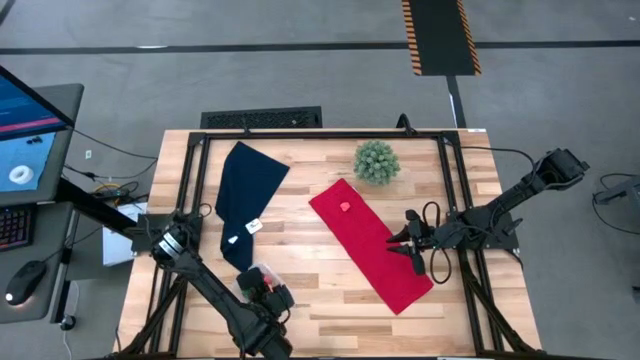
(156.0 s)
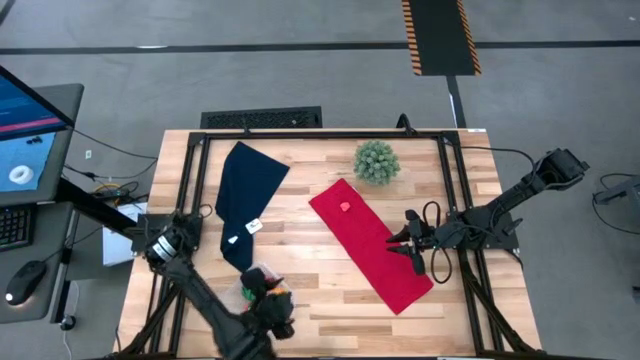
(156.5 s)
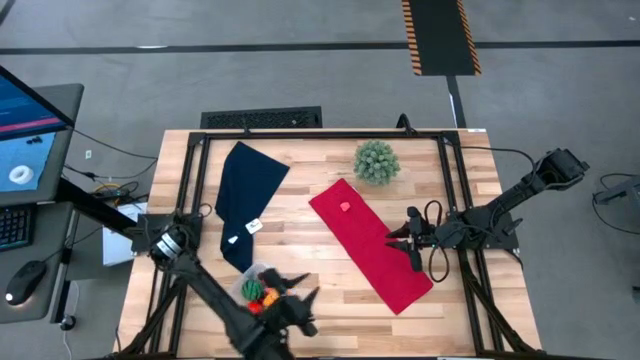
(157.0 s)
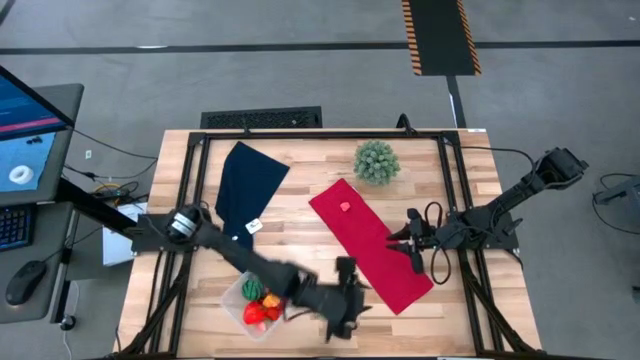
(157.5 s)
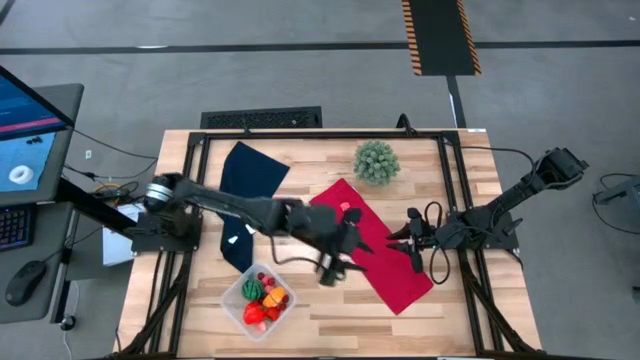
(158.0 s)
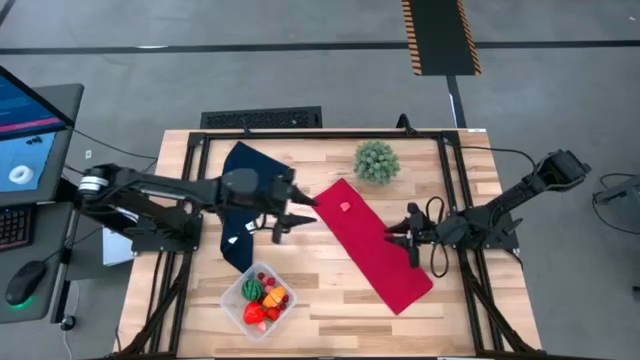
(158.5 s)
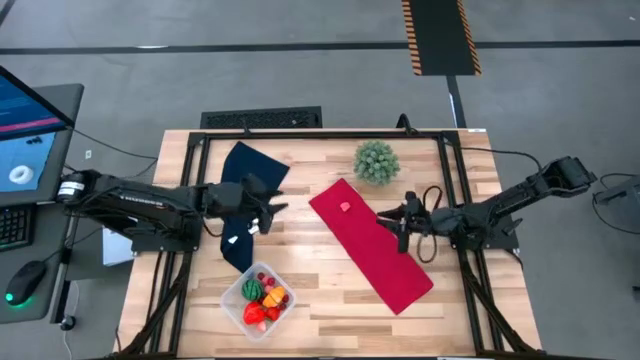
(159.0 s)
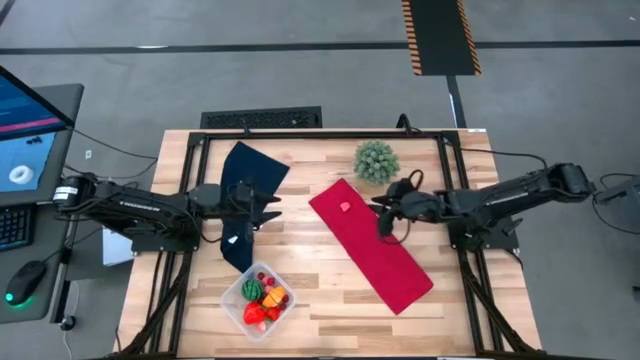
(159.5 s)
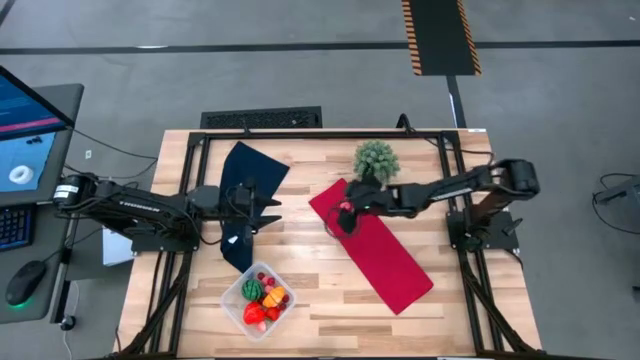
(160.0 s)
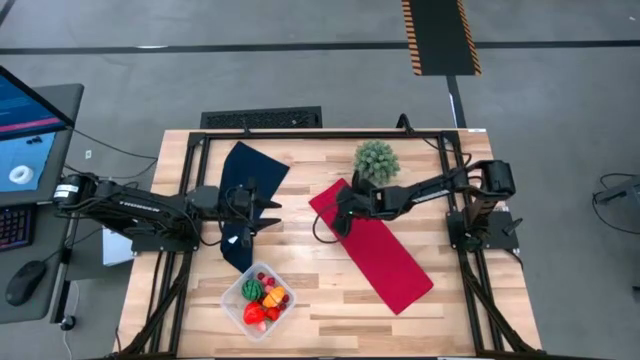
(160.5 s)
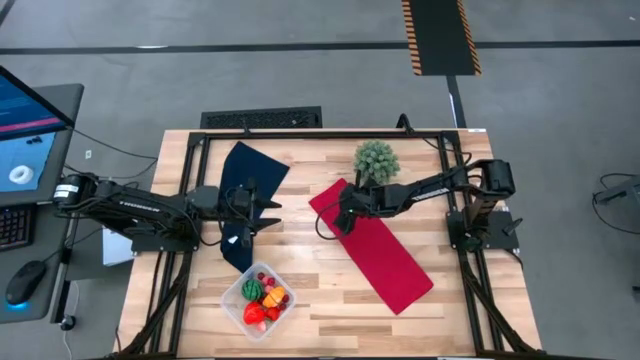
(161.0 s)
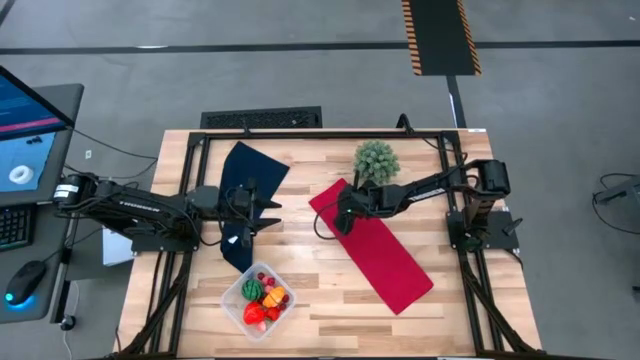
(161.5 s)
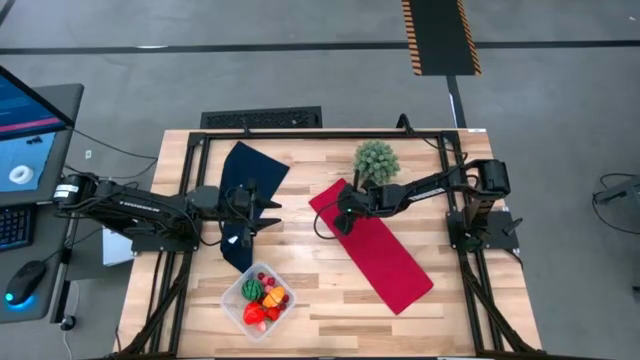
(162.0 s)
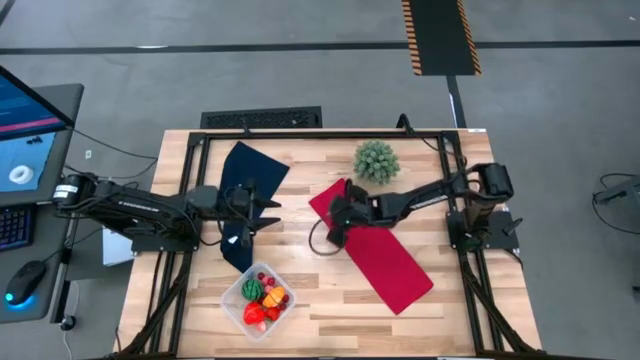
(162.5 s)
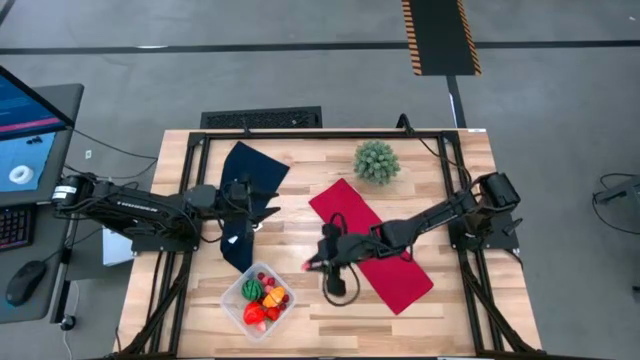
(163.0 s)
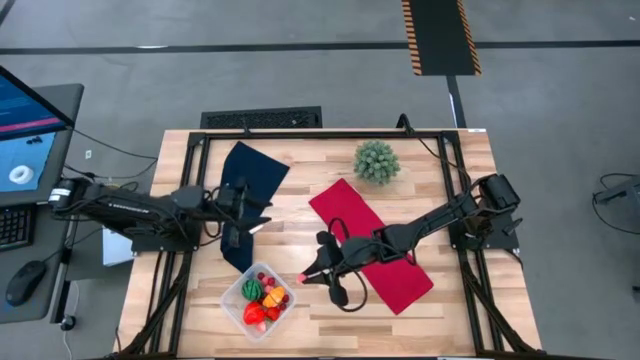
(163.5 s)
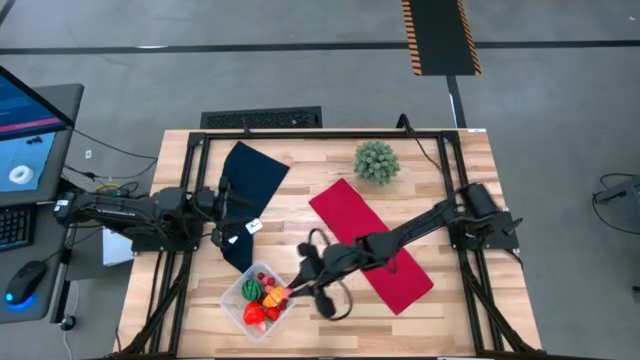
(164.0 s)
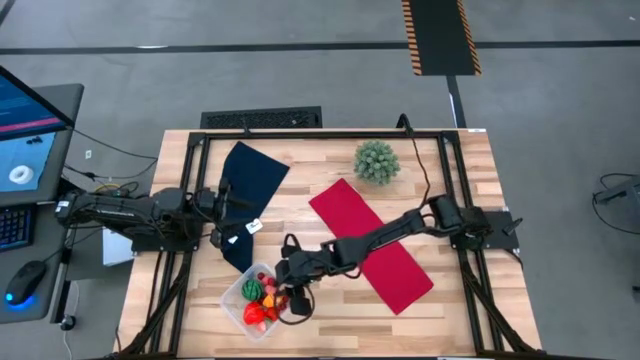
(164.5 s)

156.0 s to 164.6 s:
Task: Pick and placing Produce into tupperware
Put the peach into the transparent bin

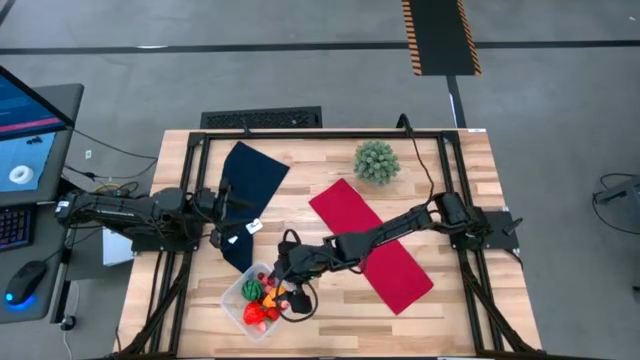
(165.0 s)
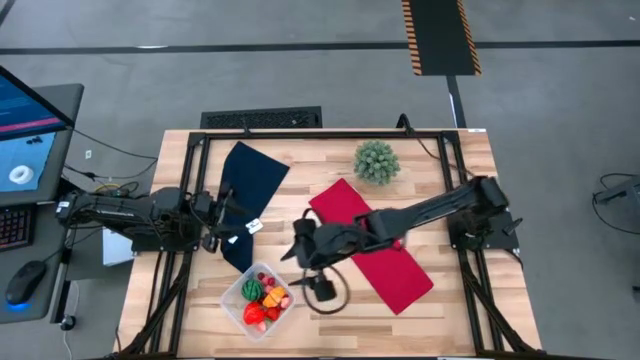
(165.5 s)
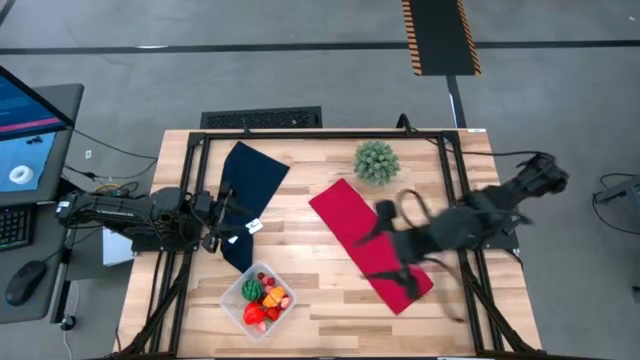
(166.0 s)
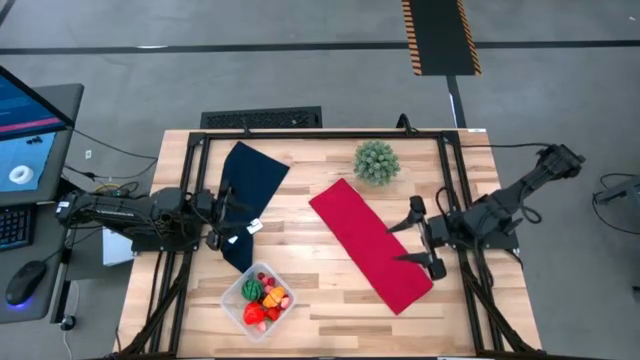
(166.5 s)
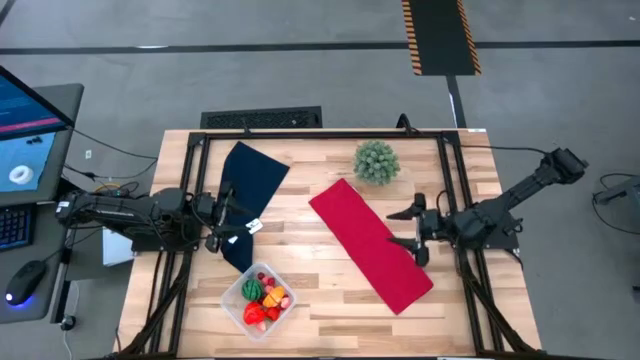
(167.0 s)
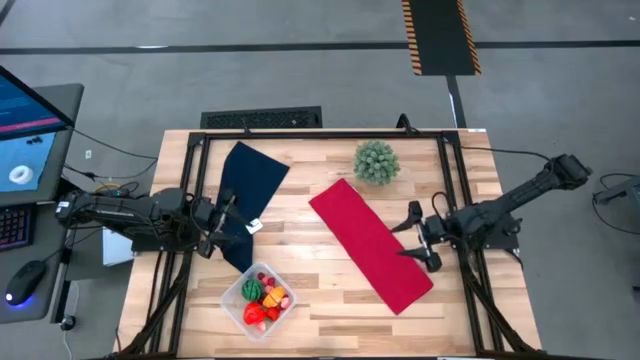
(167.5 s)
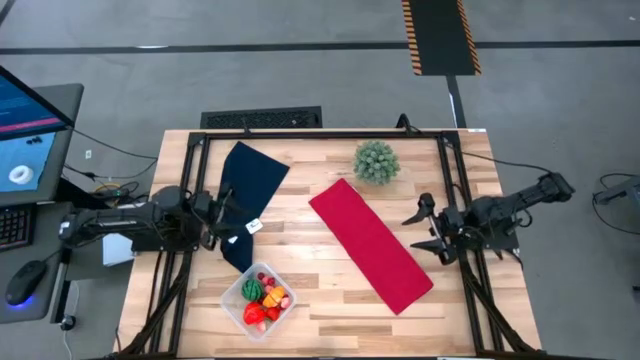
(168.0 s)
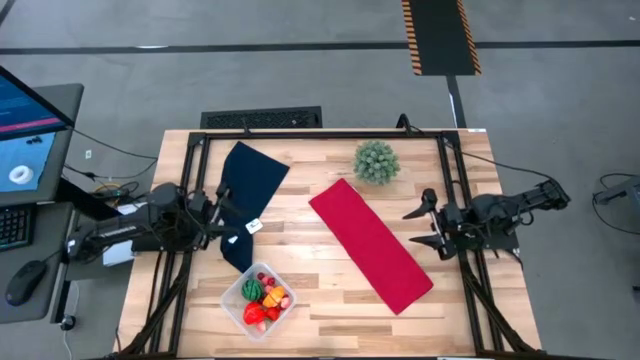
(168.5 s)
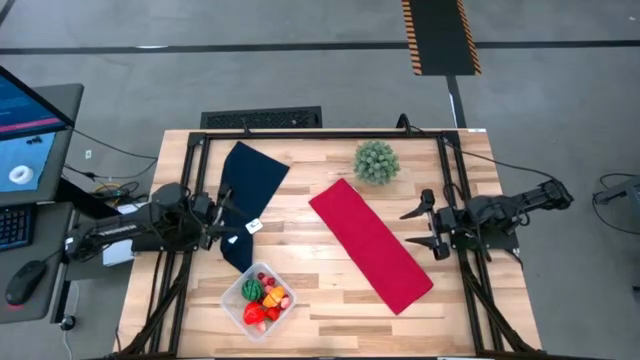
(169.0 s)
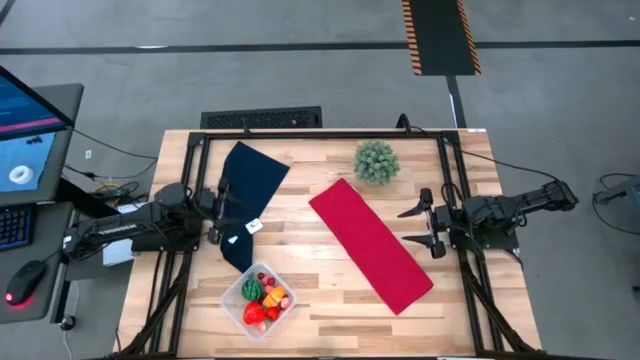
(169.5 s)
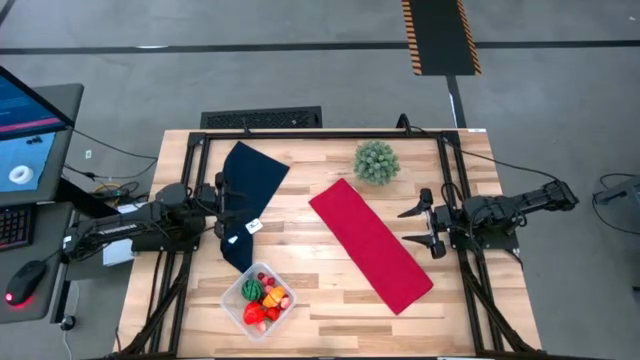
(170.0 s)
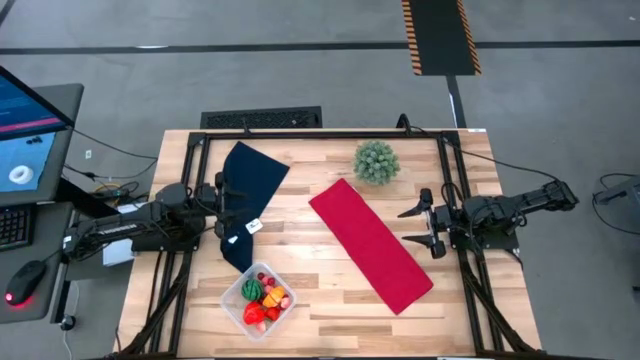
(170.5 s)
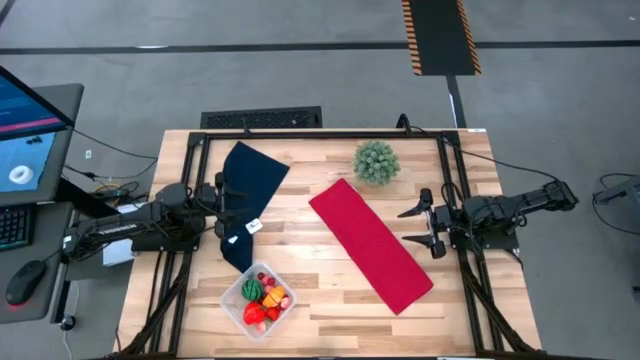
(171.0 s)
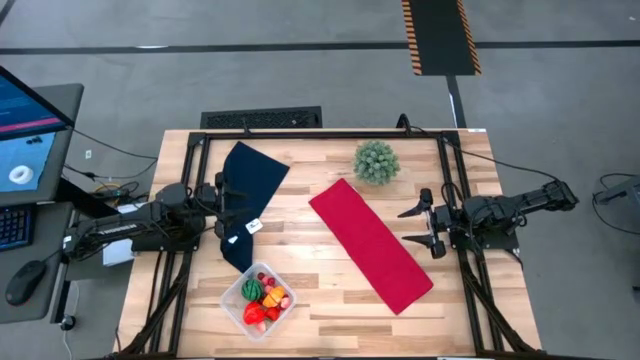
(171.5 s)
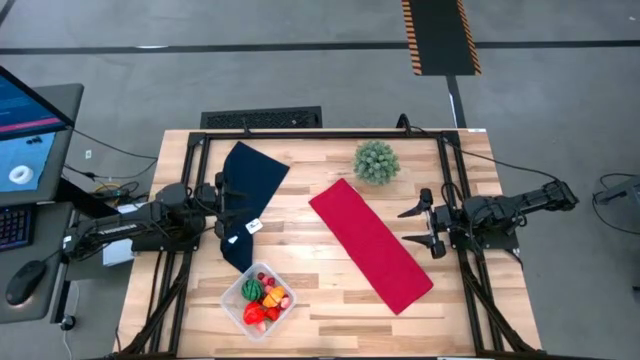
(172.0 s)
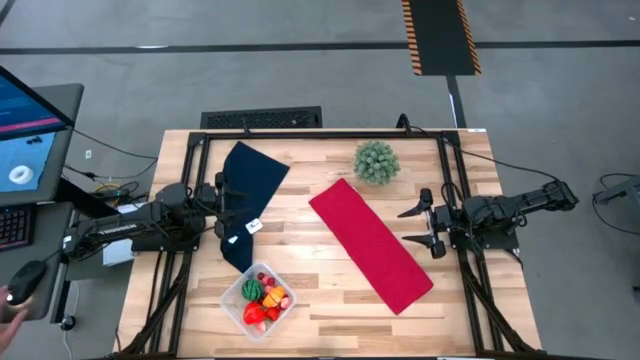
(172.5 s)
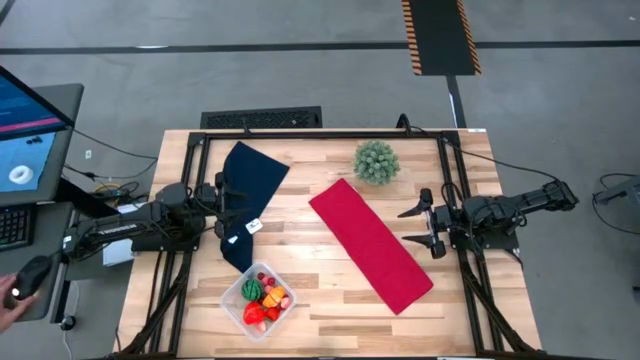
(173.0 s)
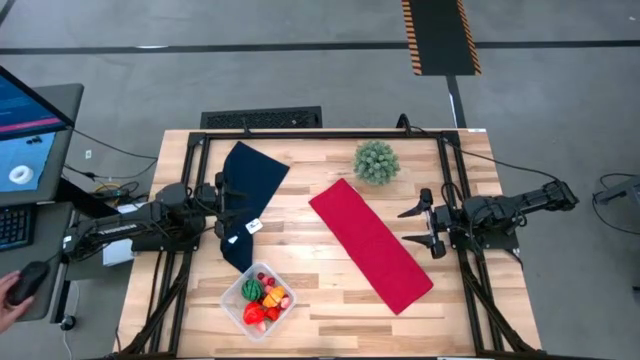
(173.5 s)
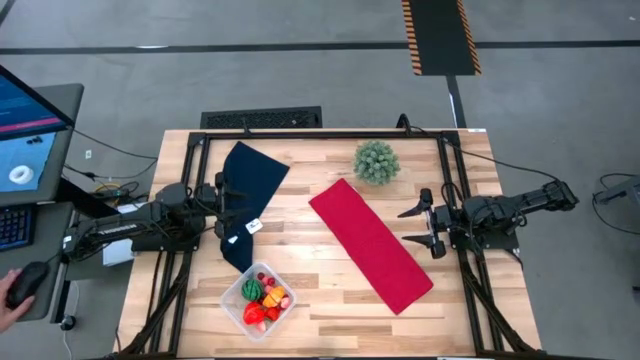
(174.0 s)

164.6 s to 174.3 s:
Return to Home Position

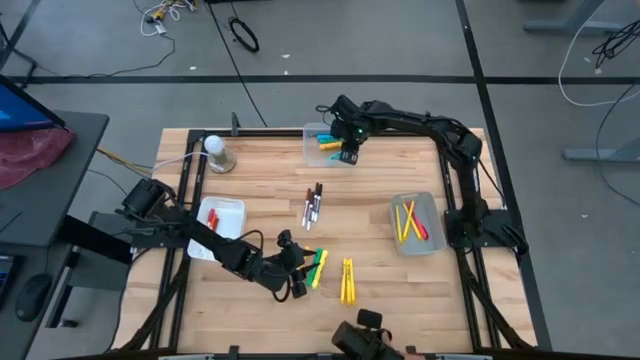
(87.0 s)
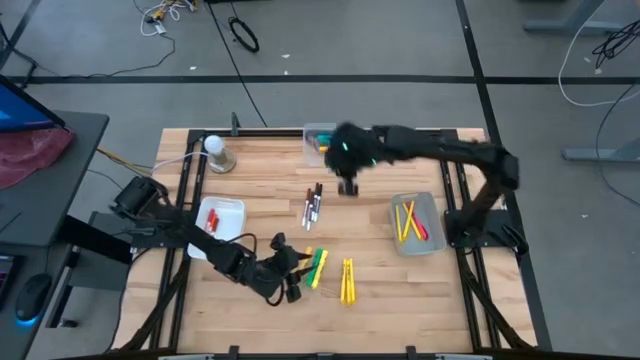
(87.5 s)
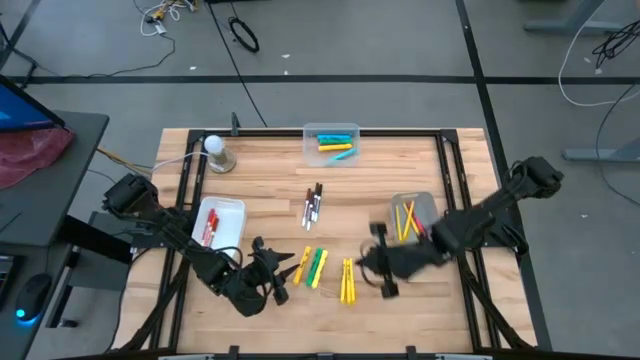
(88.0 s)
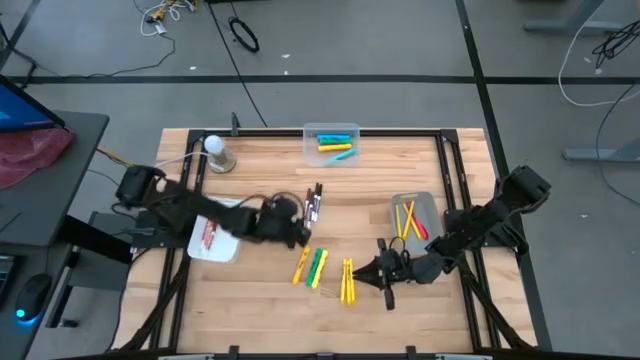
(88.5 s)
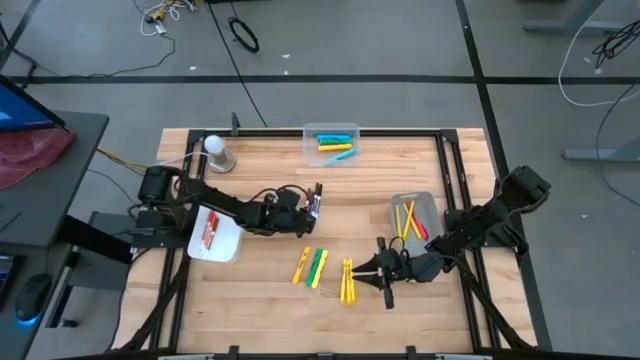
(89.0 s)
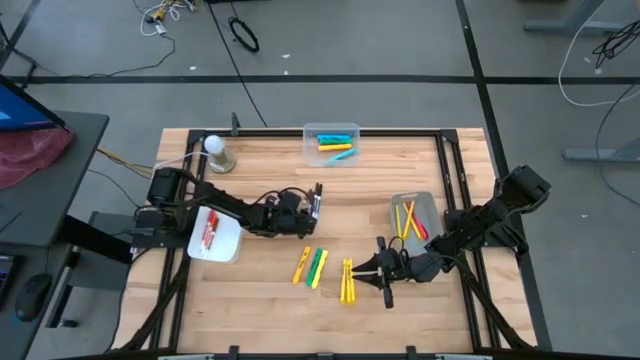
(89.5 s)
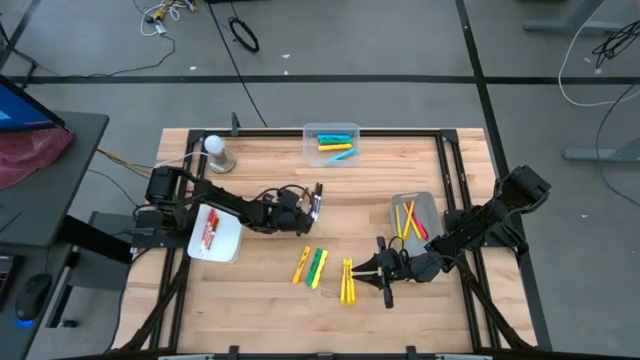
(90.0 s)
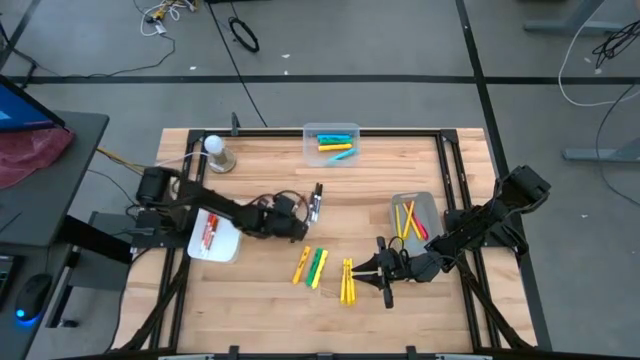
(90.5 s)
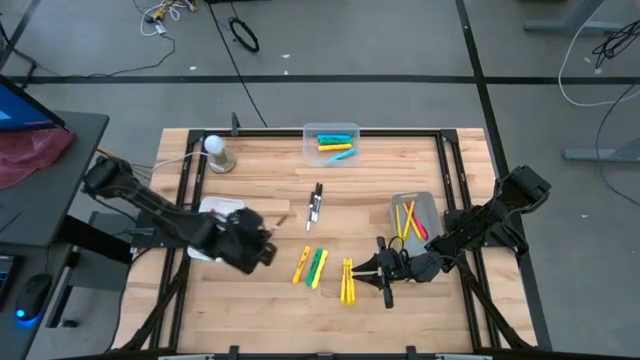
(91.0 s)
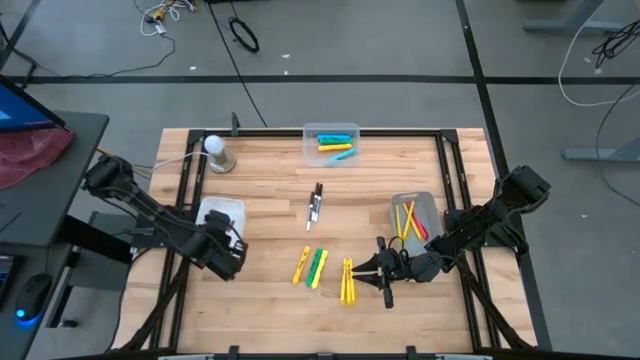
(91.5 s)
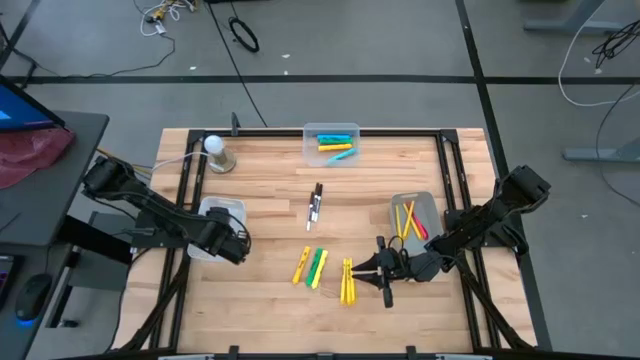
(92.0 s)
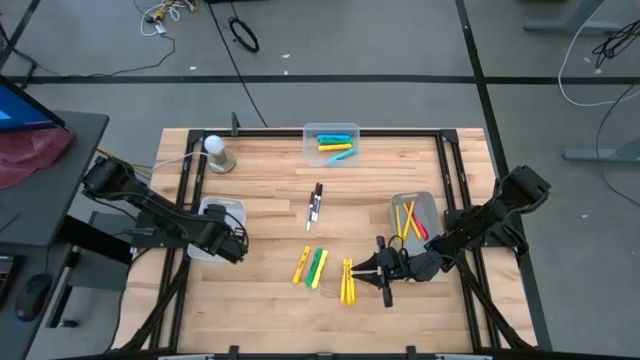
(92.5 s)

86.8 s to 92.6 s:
Task: Pick & Place Markers
Put the light brown marker pen into the white bin
